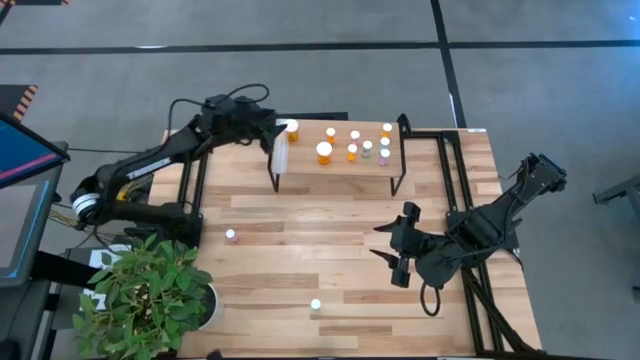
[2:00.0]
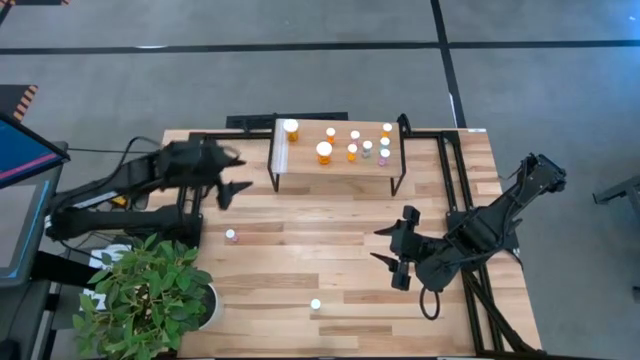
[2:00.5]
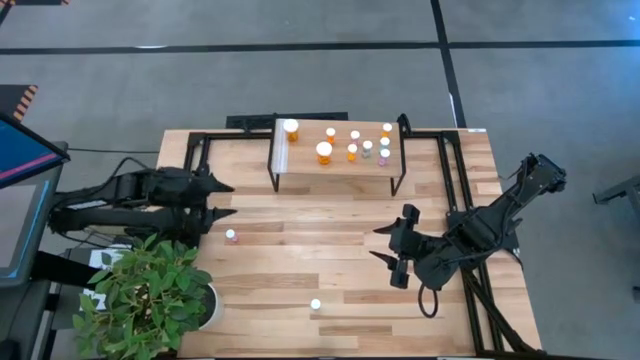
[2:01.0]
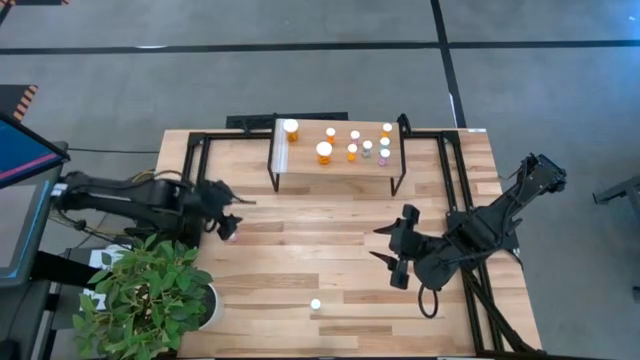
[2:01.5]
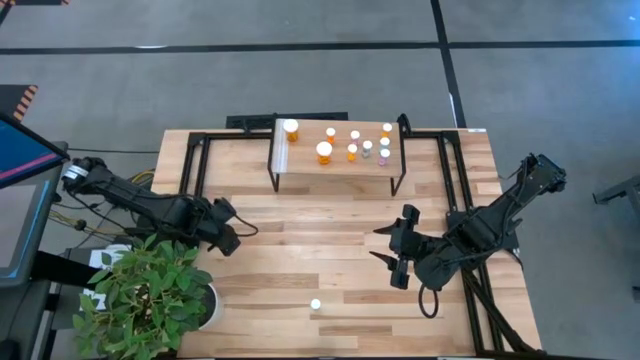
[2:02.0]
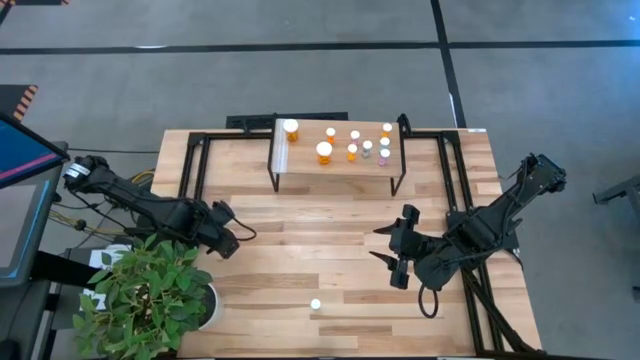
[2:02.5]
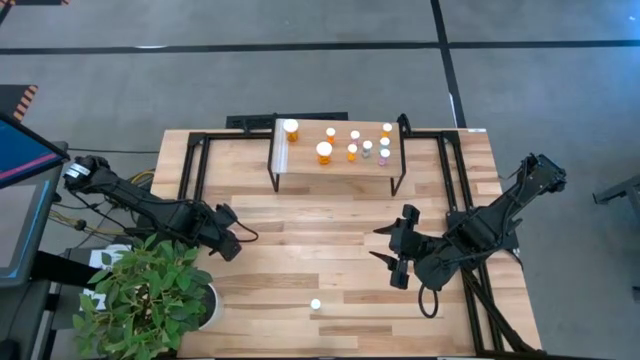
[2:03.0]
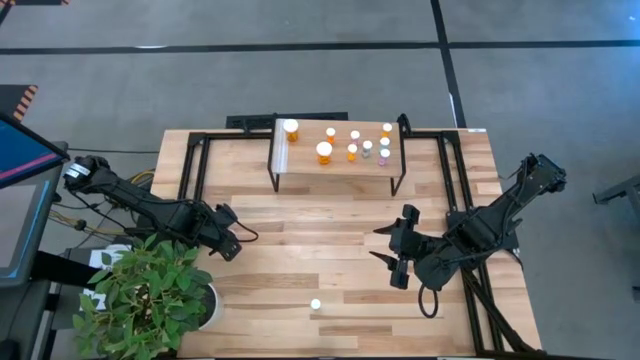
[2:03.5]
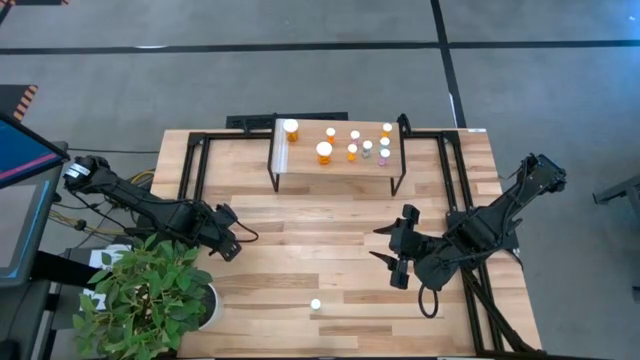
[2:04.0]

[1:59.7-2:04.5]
Task: Pick and place medicine bottles onto shelf by color
Put the pink pill bottle on the shelf

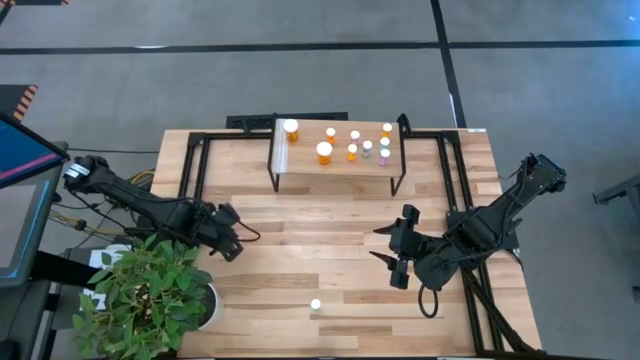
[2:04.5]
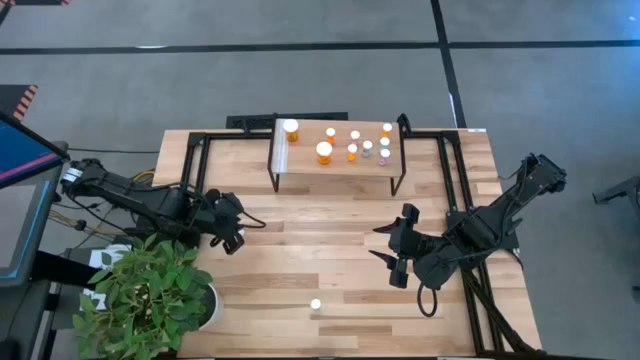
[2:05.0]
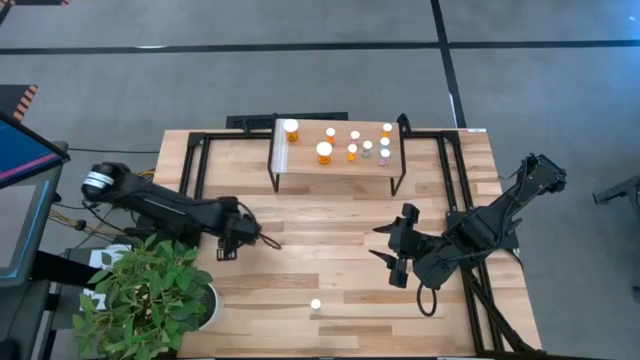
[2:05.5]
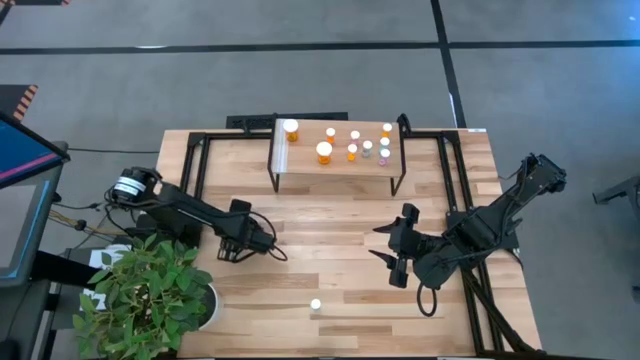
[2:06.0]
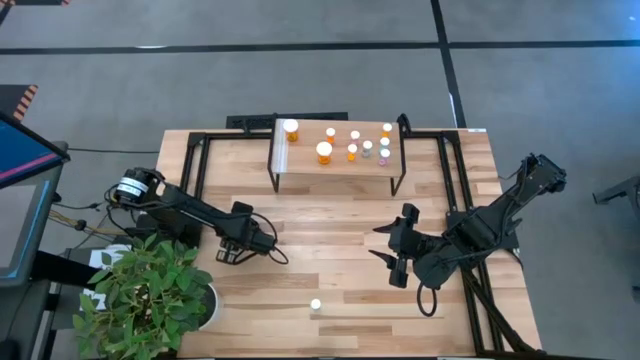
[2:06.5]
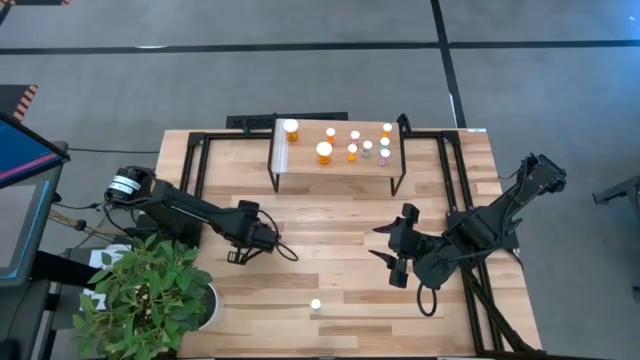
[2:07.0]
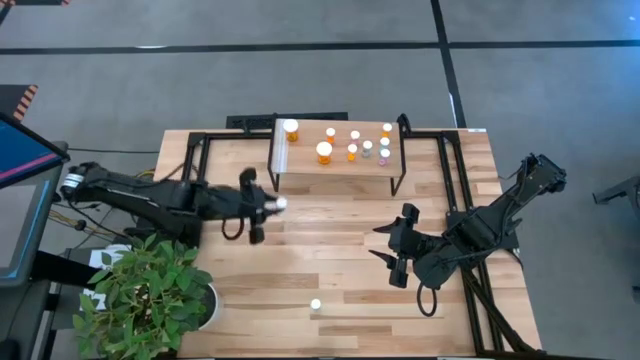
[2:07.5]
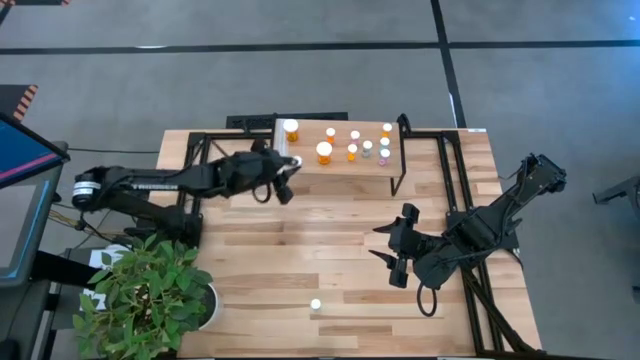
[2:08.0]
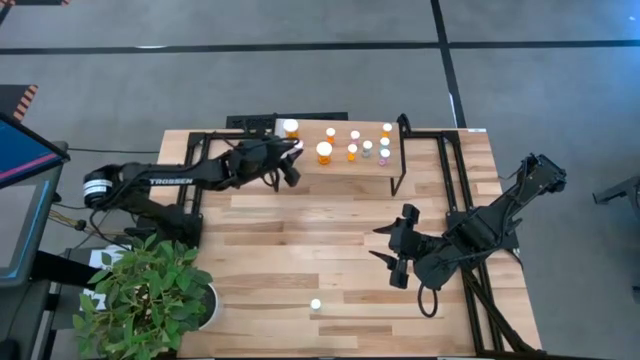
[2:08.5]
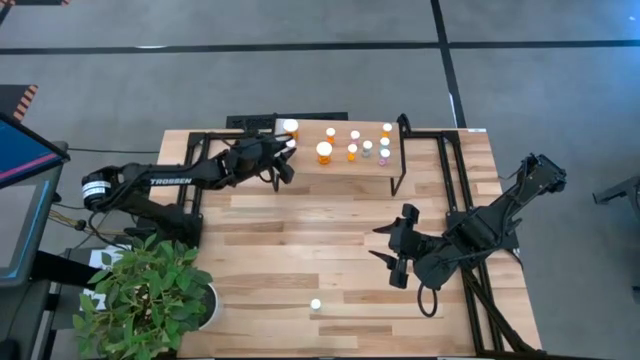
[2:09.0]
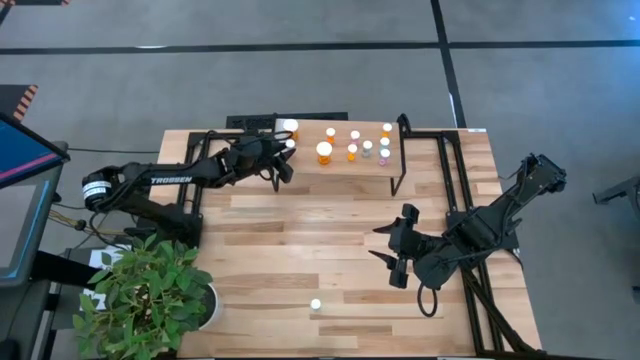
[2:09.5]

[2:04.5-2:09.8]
Put the pink pill bottle on the shelf

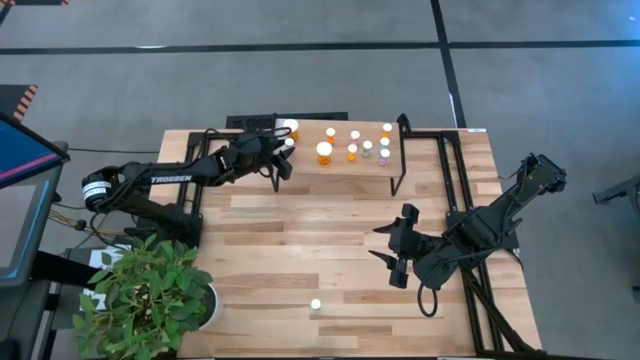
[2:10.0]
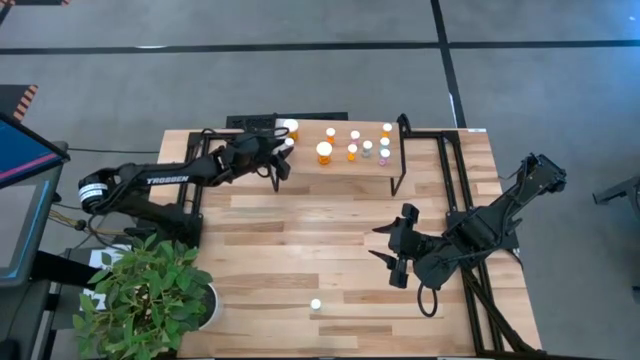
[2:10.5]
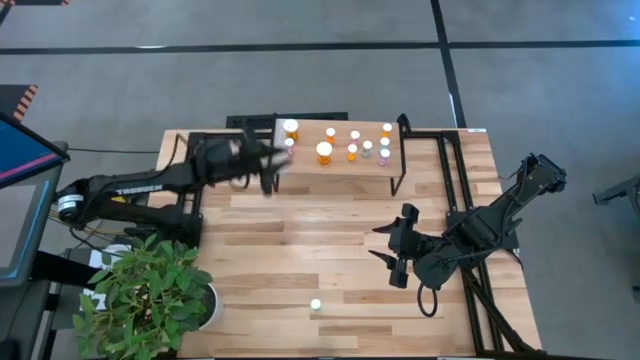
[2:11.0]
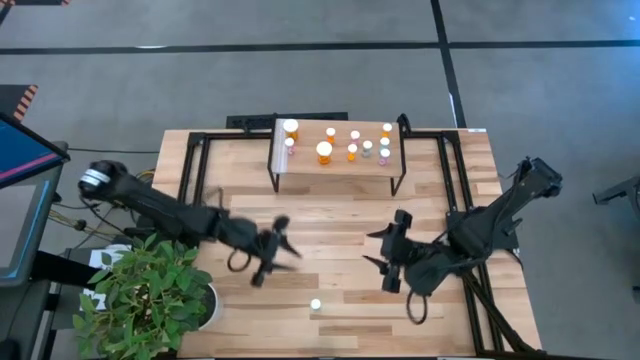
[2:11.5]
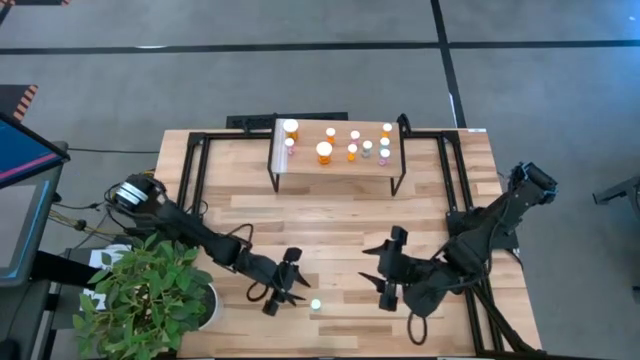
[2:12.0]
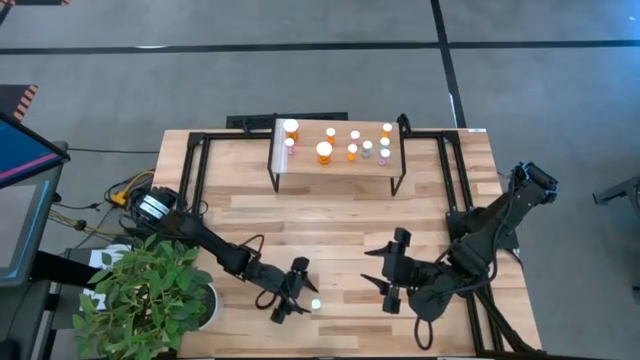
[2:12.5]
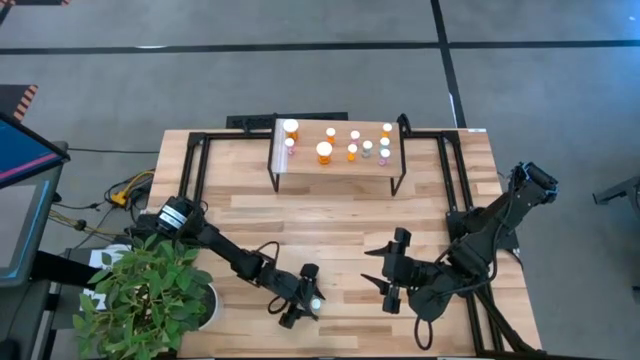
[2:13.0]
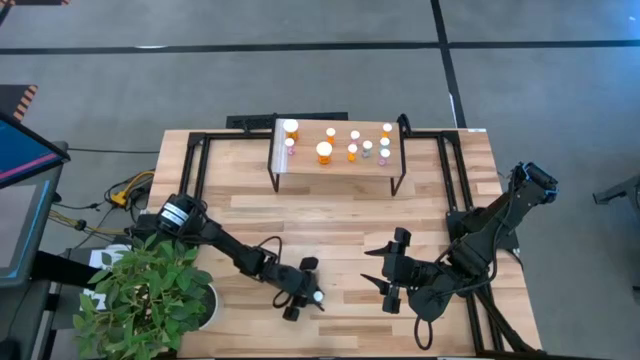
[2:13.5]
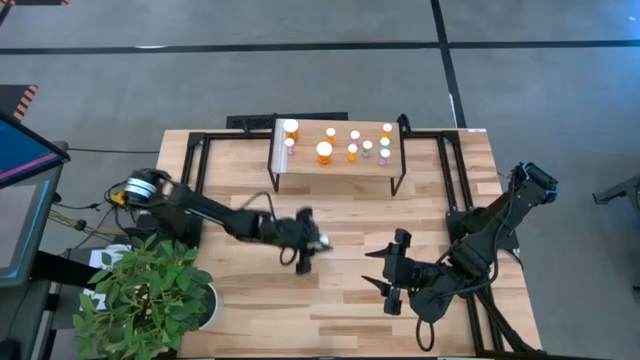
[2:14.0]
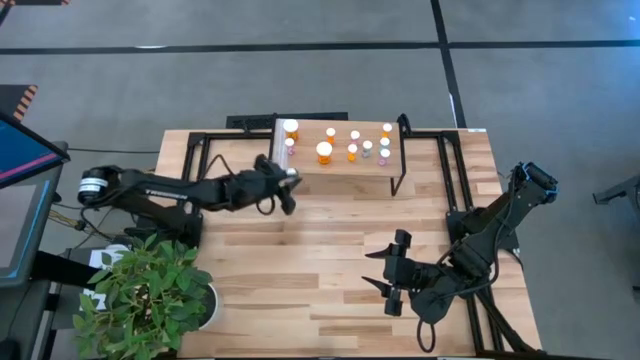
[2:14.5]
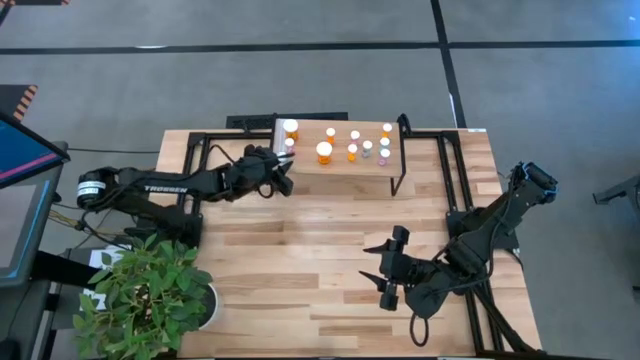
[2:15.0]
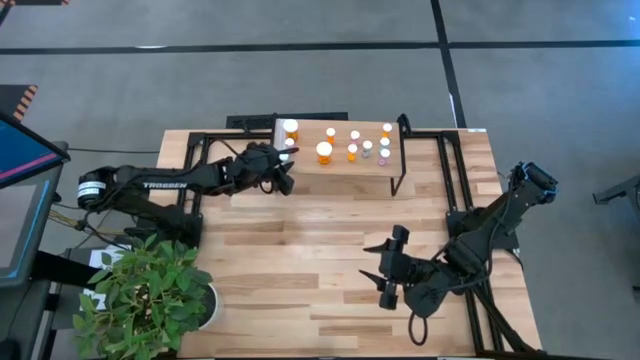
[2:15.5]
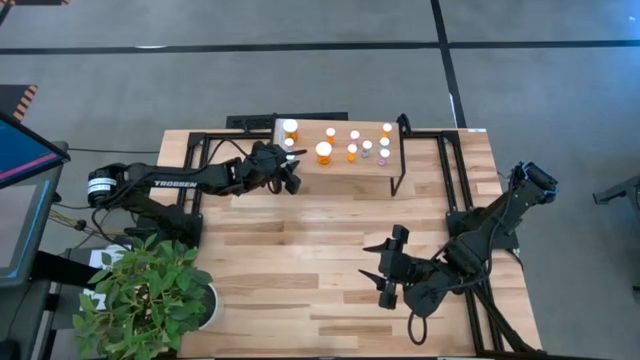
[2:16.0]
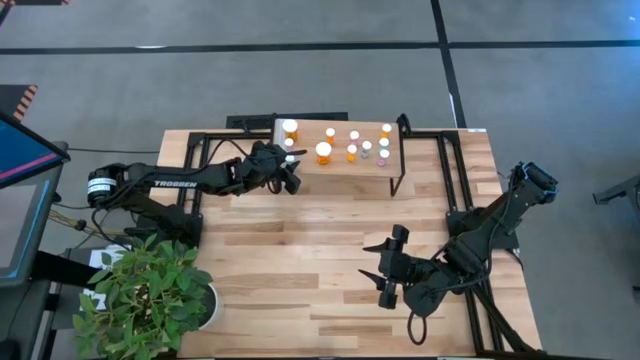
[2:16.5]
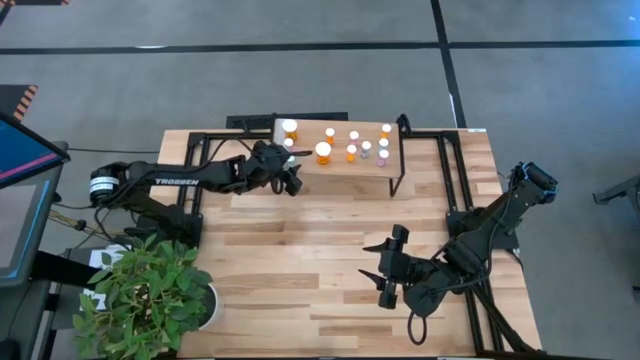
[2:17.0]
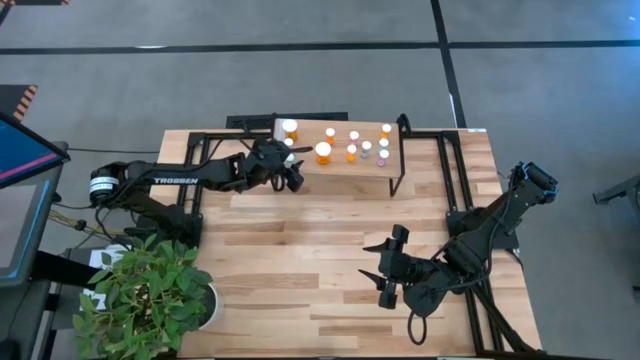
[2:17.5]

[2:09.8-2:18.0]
Put the green pill bottle on the shelf

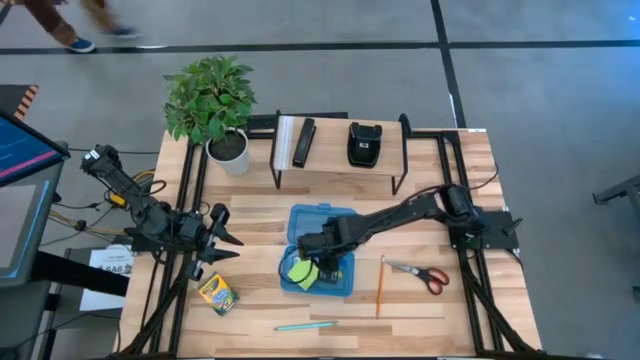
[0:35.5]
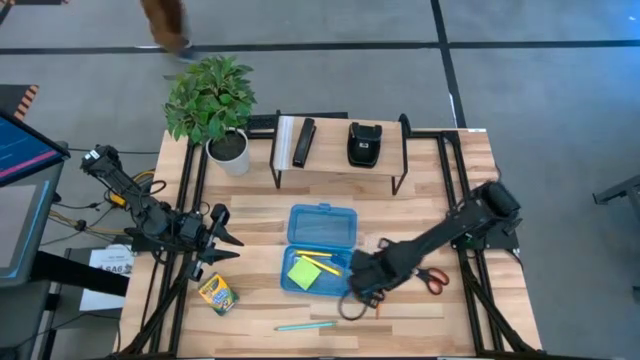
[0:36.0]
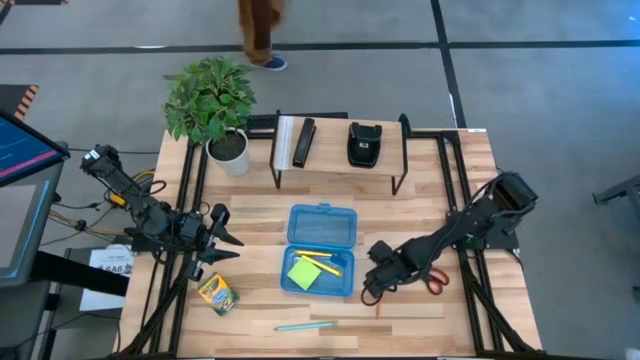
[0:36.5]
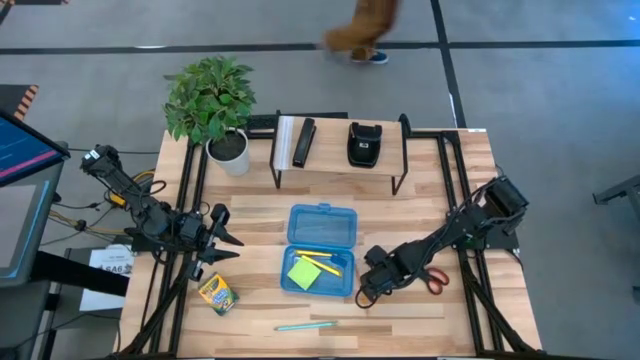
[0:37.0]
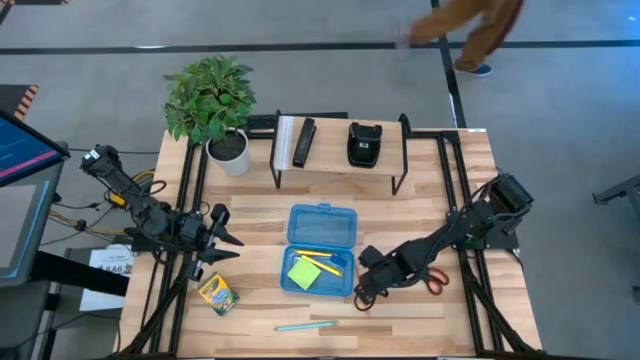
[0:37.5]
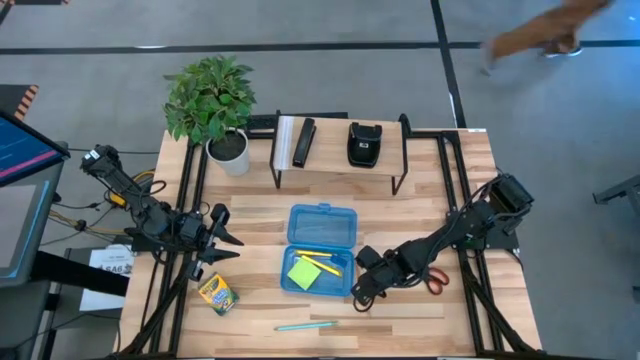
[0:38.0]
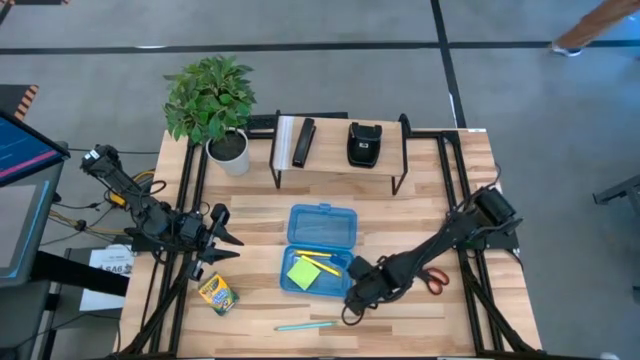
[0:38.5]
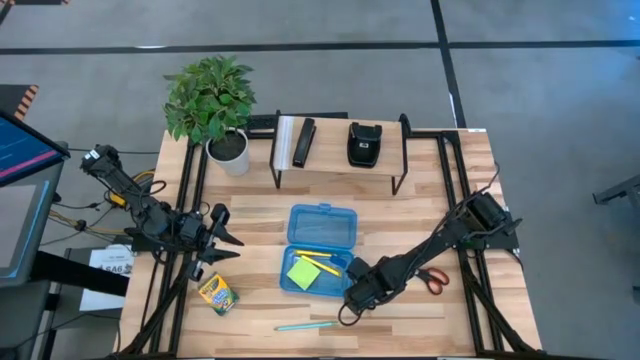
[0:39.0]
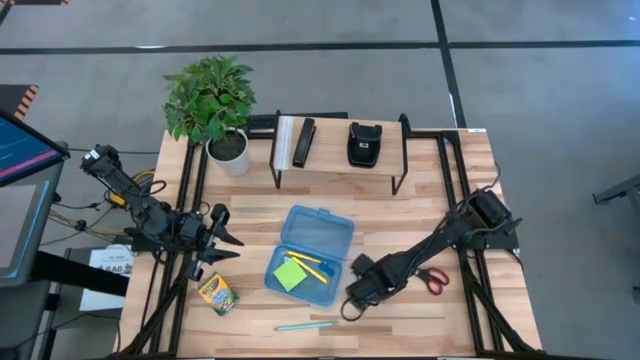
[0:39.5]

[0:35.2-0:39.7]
Task: Pack school essentials
Put the orange pencil into the blue supply box
